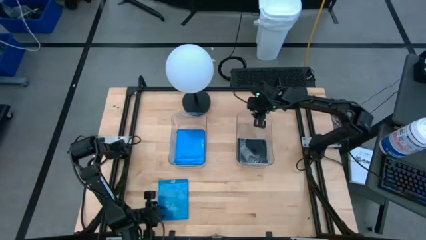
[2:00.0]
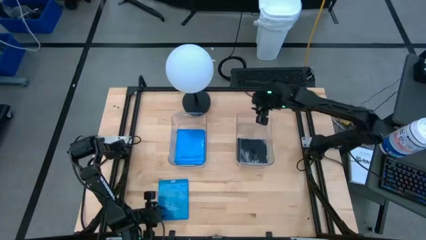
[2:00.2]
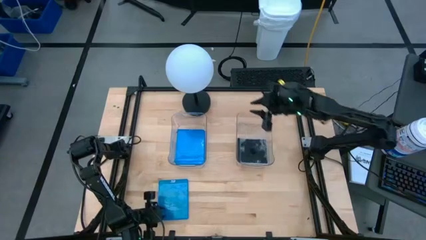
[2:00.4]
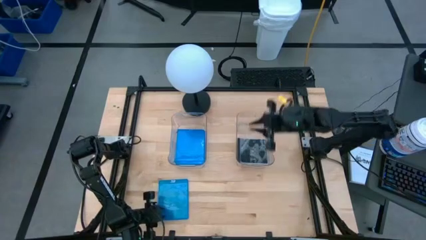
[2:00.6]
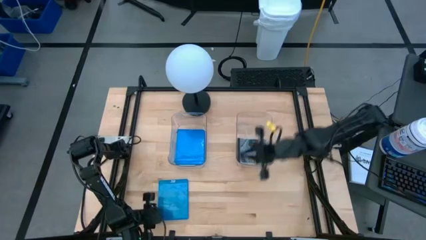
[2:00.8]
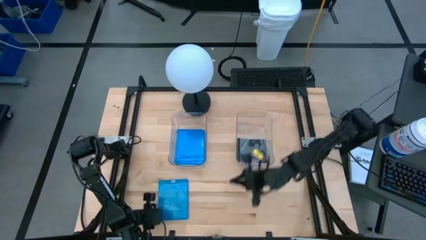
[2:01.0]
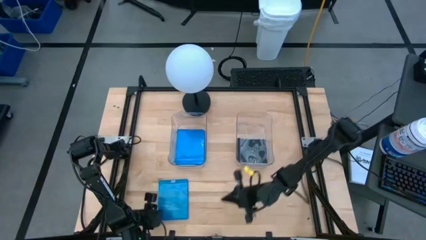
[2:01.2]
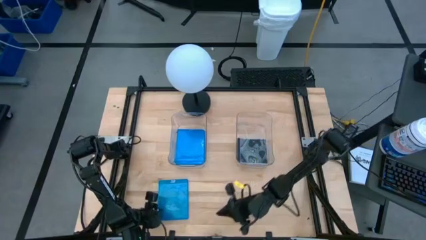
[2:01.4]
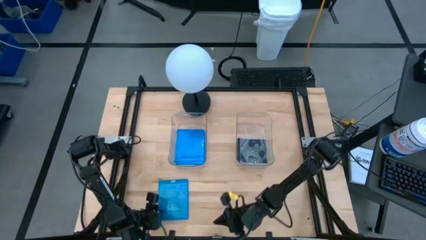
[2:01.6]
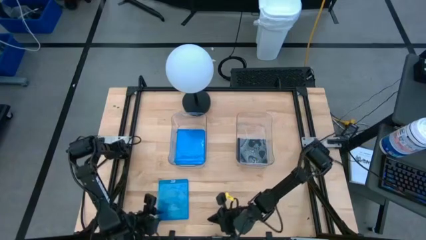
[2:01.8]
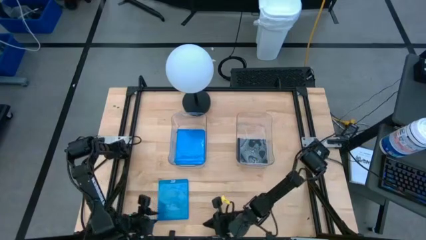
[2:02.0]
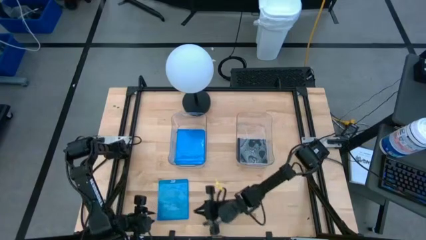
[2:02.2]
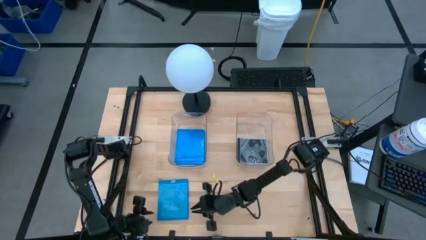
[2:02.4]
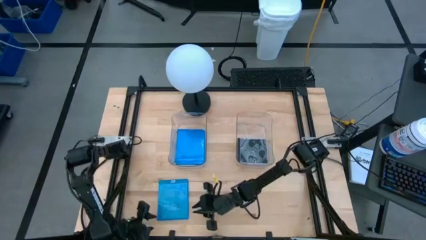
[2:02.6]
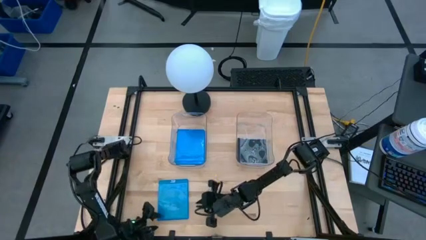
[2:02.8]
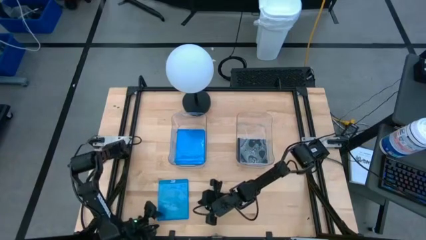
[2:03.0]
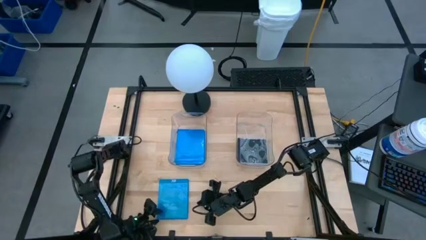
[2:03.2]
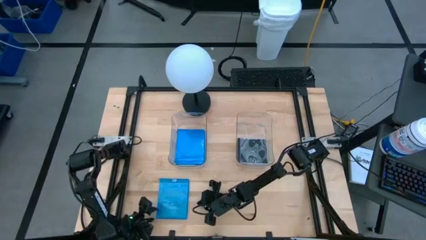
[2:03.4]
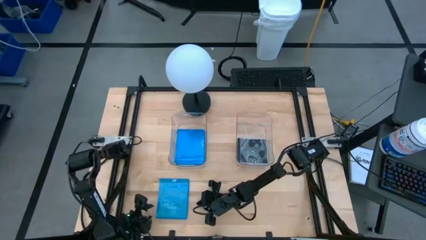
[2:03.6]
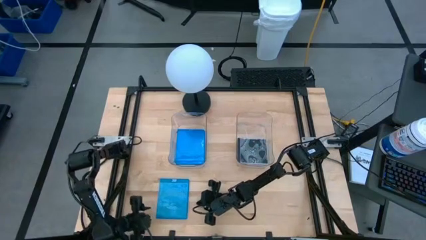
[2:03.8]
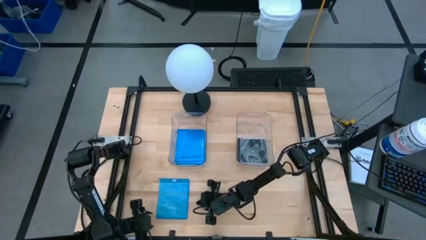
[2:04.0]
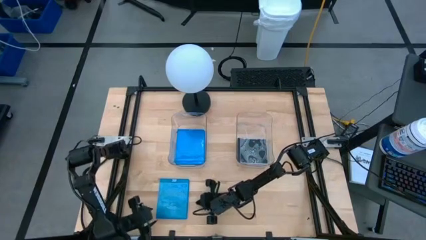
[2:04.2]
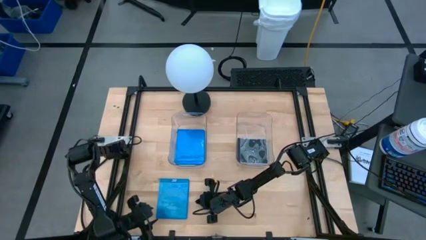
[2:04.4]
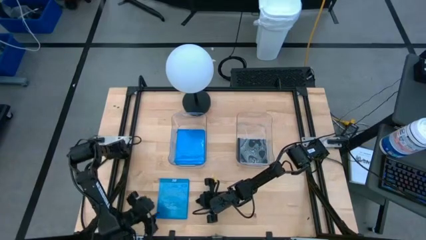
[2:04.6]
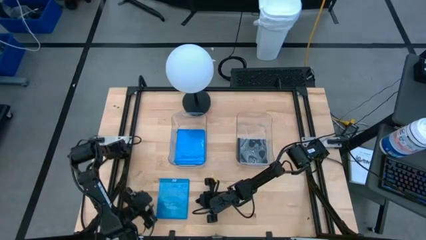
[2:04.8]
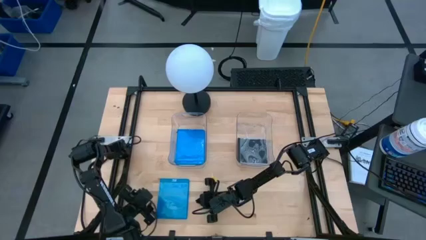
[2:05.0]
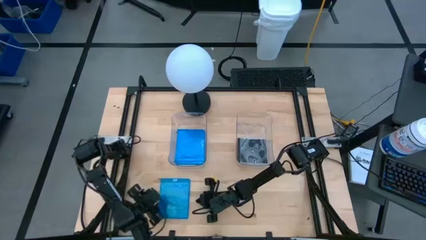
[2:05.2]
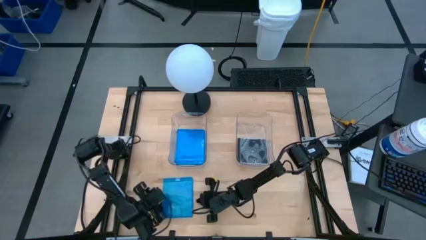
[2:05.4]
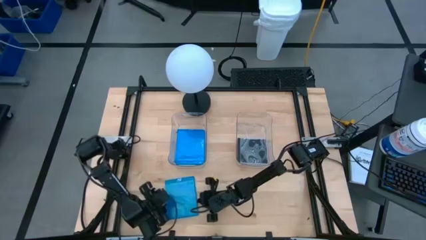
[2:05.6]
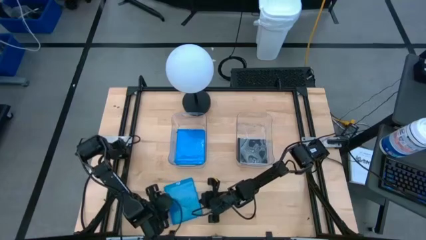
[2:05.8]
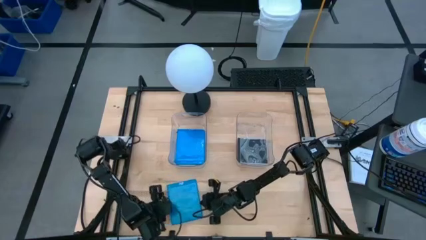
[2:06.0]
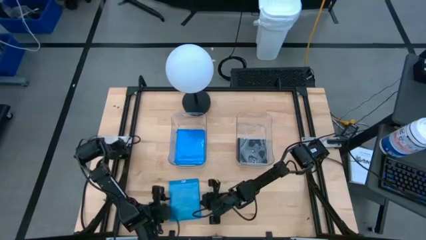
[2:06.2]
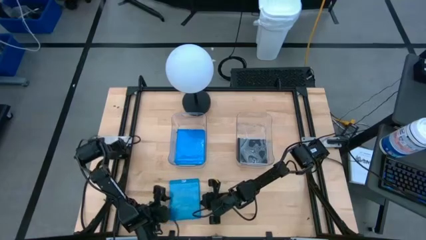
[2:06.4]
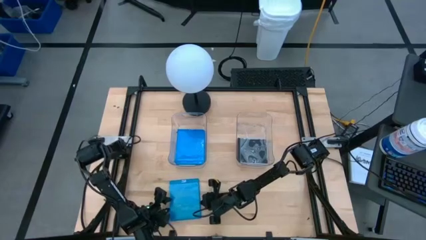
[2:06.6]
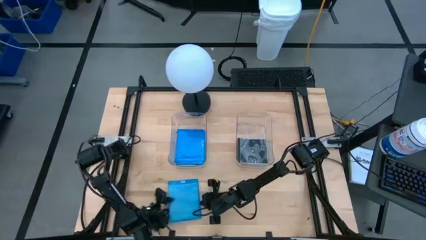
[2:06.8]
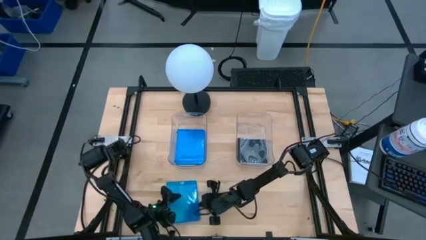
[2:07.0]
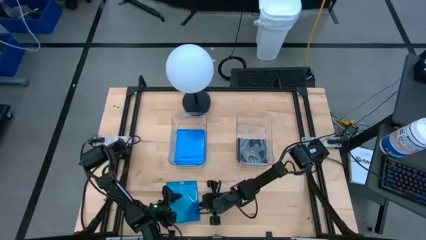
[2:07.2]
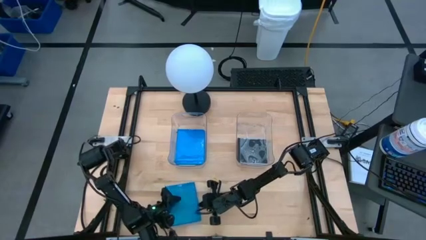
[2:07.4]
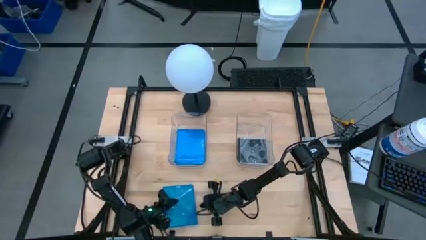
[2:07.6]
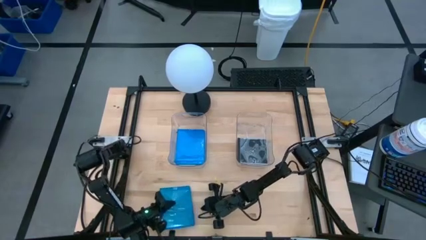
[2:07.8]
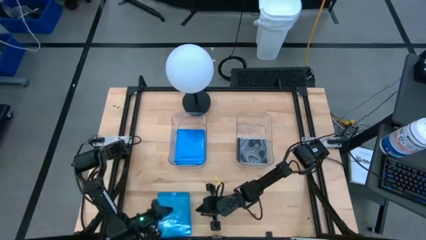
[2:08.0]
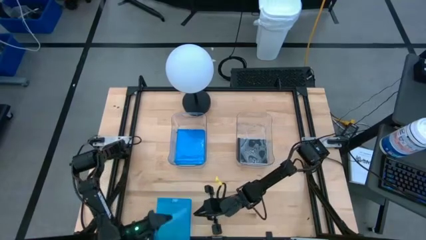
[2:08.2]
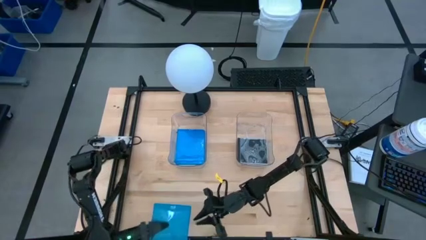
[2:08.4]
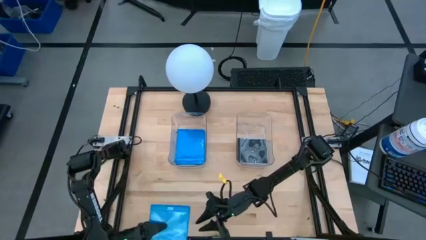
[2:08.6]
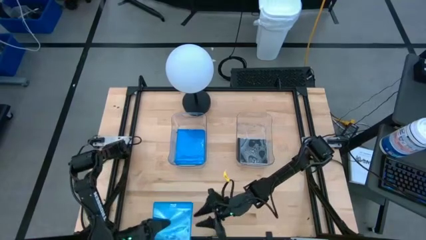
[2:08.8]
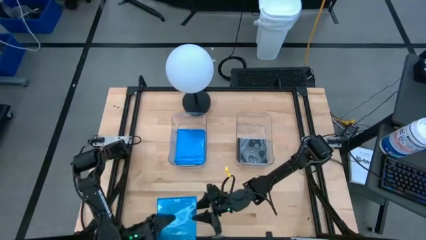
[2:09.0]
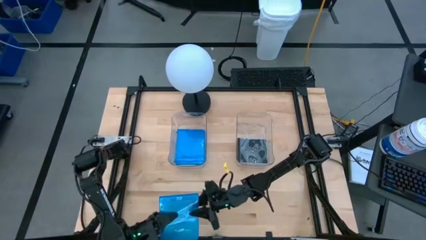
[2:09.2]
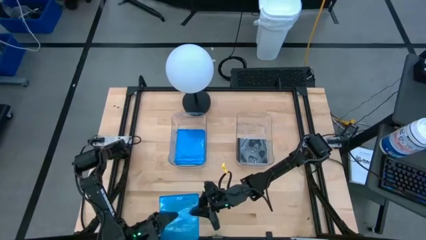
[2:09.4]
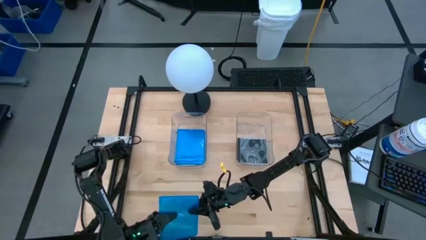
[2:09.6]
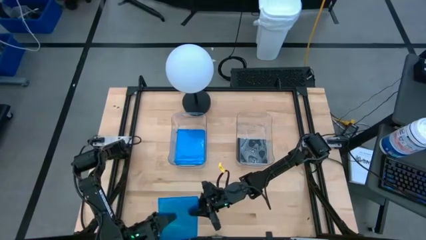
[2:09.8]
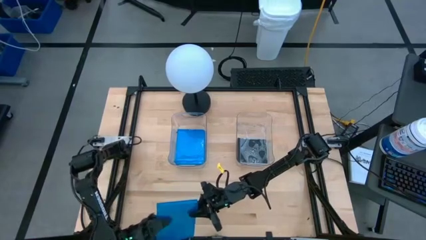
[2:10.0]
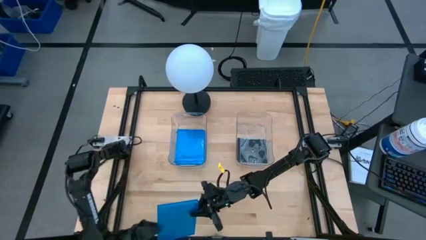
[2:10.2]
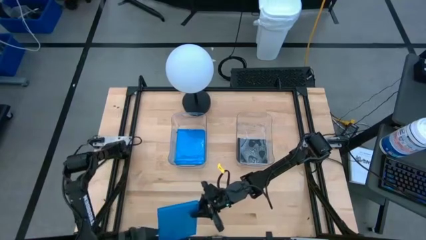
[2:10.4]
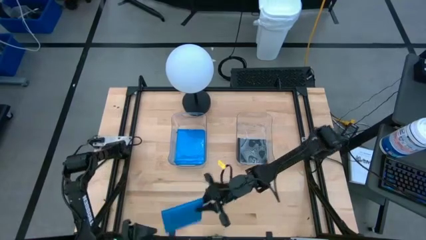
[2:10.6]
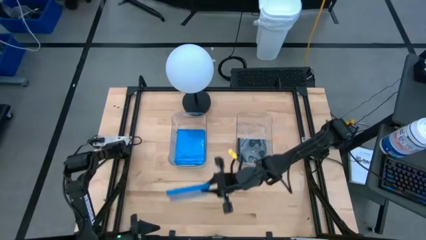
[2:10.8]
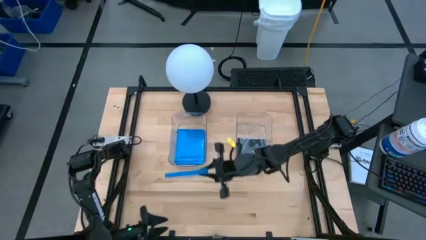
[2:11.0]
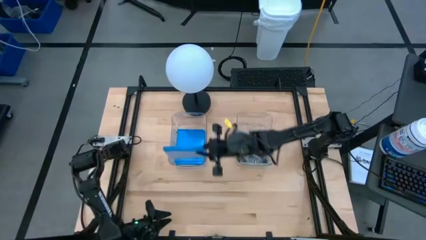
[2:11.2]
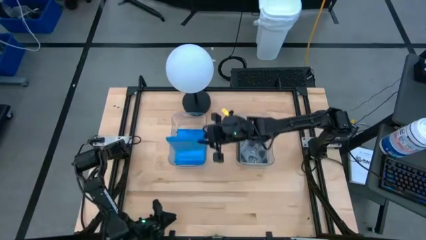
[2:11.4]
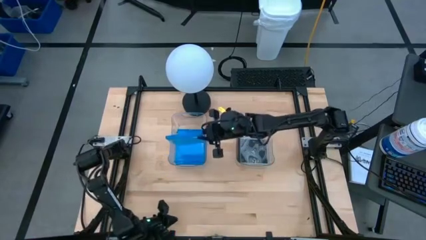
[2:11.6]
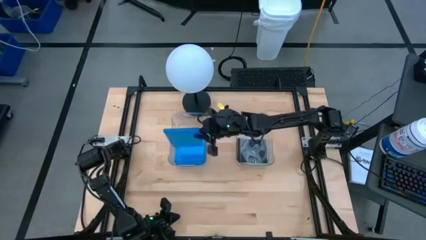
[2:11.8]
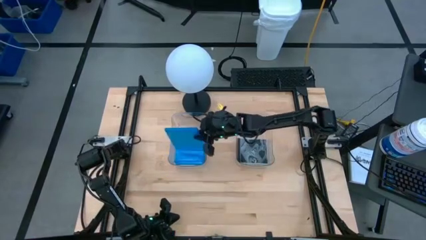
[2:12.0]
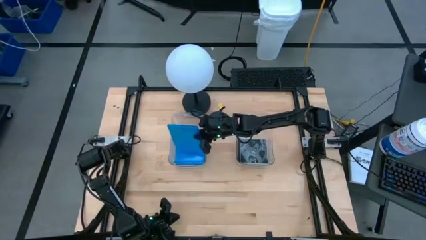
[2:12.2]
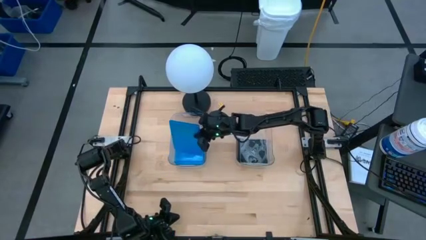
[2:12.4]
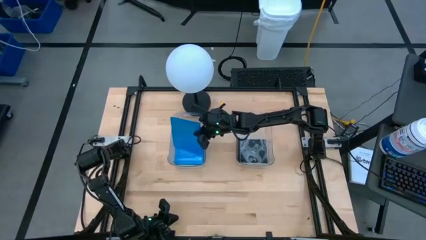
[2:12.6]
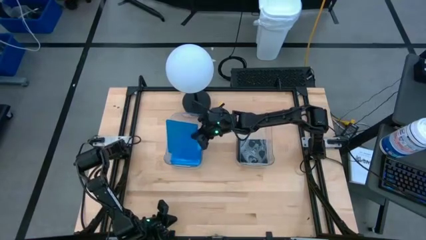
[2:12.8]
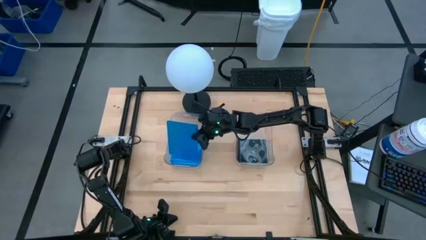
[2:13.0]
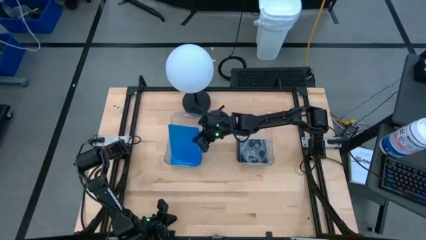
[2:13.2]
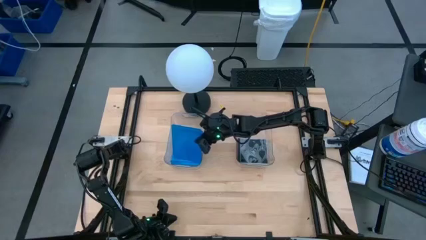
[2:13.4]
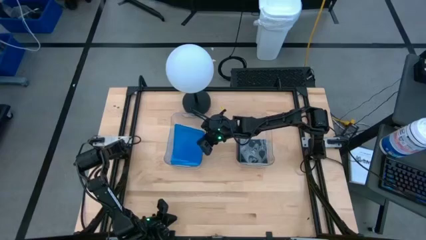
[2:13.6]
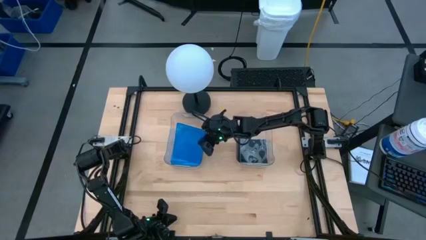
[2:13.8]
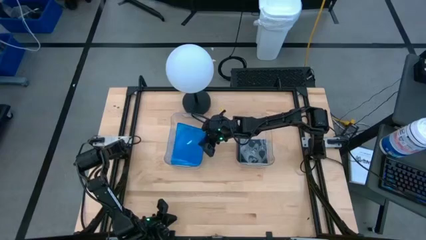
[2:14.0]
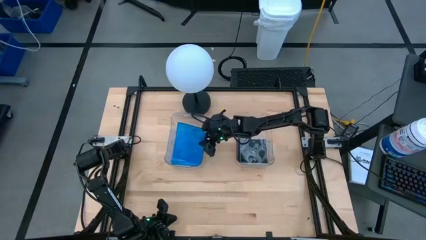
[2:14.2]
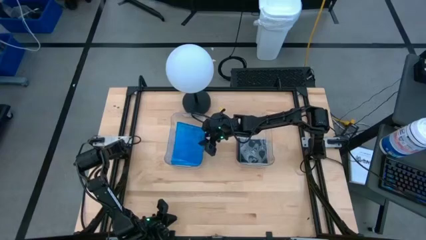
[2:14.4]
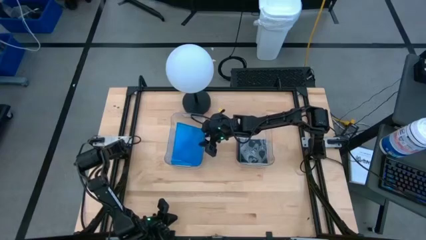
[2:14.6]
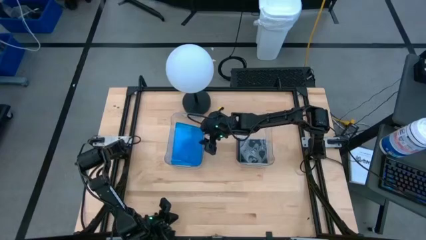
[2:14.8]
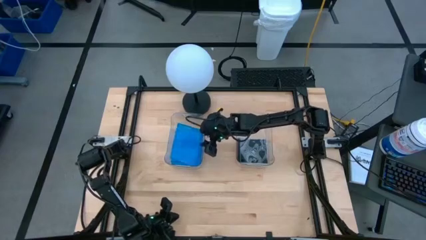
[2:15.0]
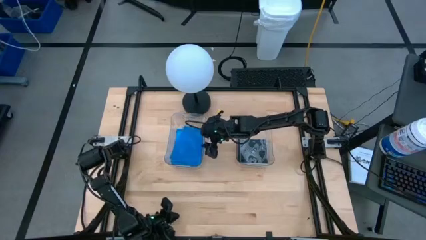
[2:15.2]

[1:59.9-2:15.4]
Task: Pick & place jewel cases by type
Put the blue CD case into the left transparent bin
